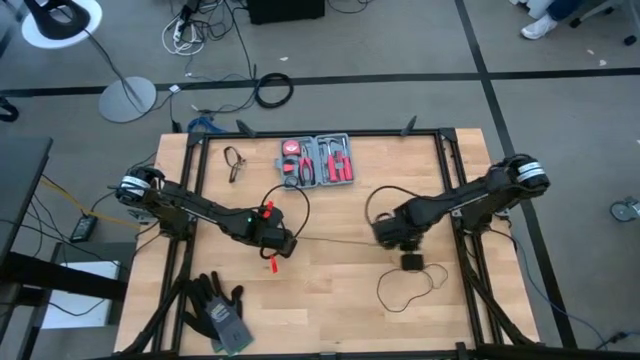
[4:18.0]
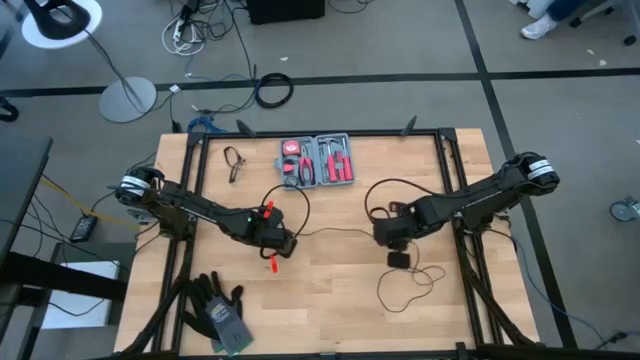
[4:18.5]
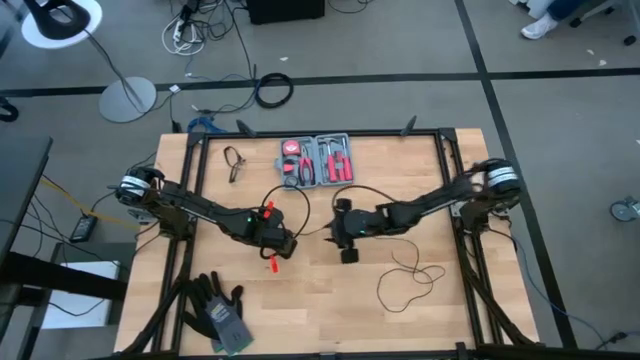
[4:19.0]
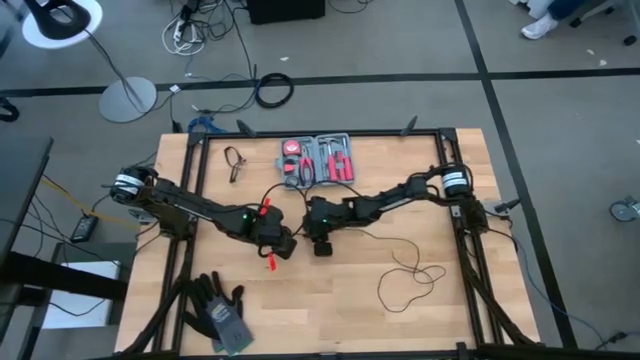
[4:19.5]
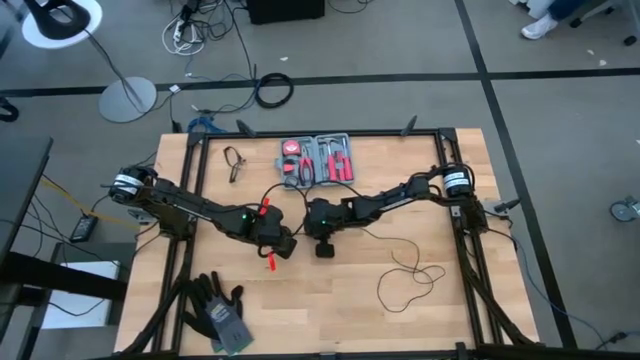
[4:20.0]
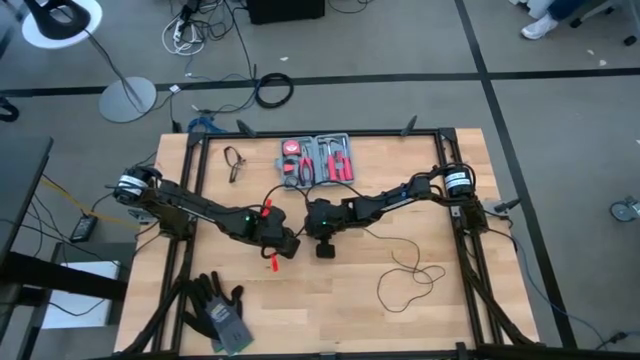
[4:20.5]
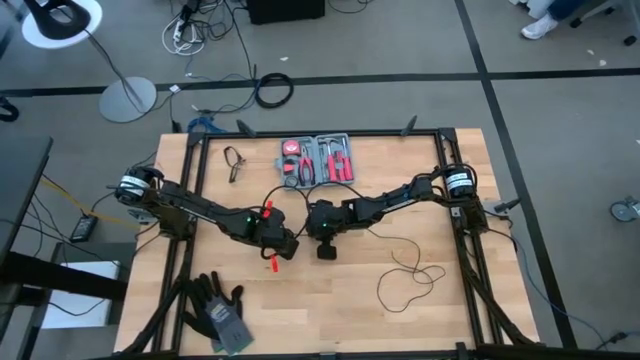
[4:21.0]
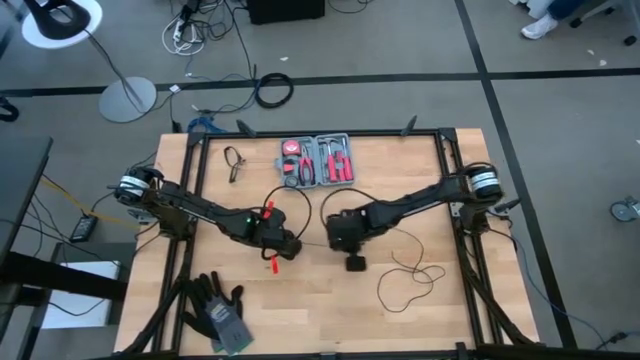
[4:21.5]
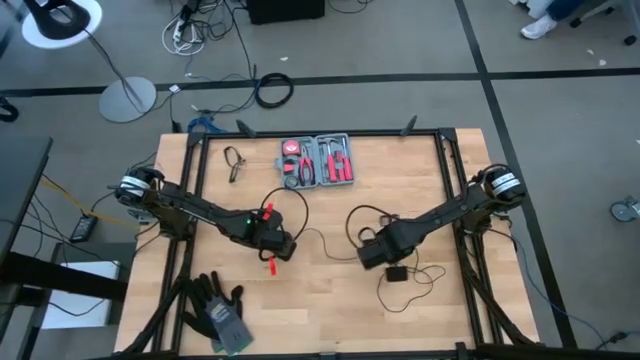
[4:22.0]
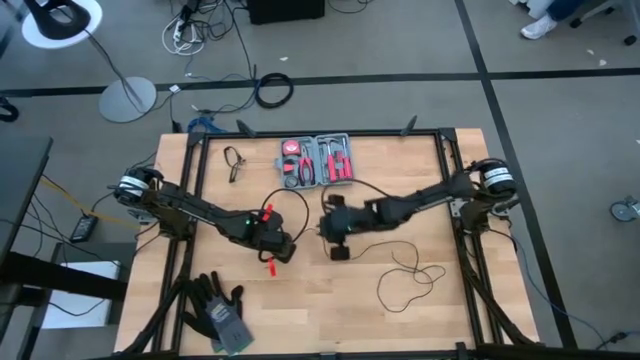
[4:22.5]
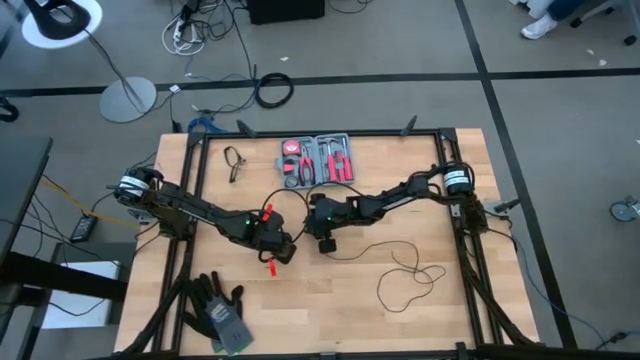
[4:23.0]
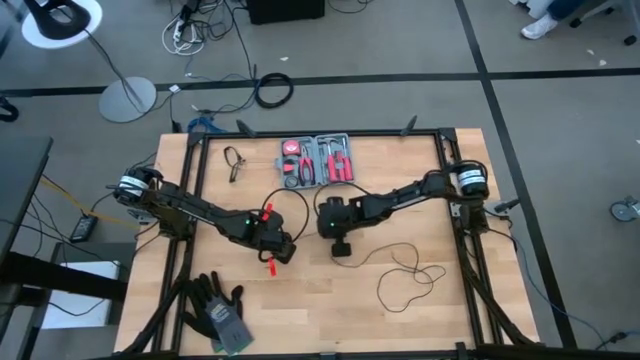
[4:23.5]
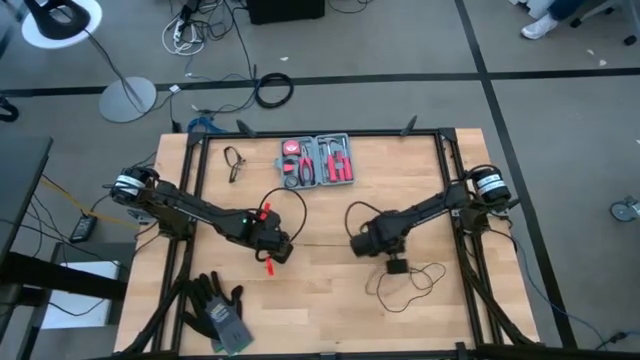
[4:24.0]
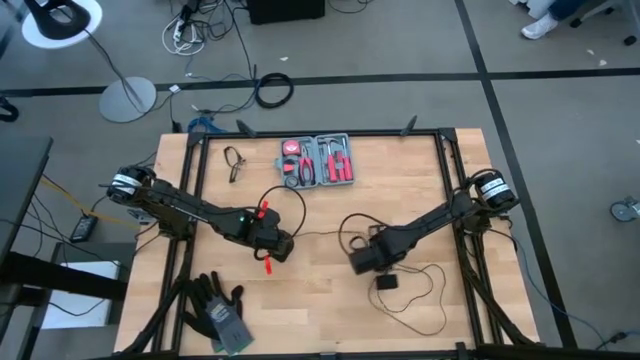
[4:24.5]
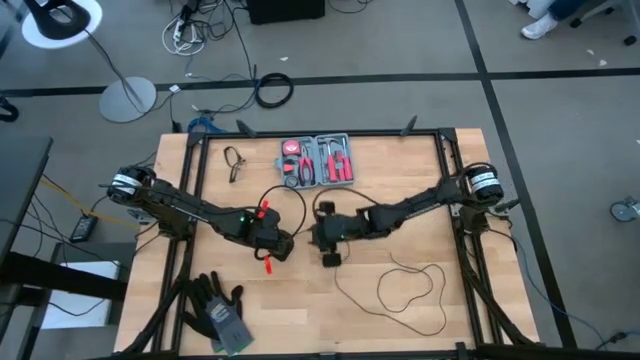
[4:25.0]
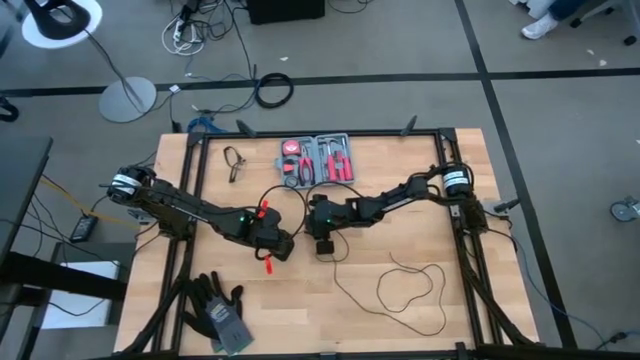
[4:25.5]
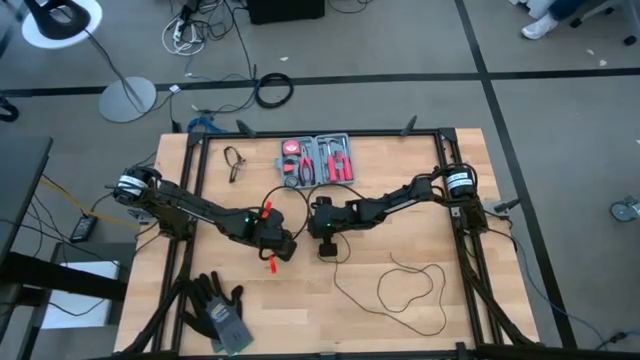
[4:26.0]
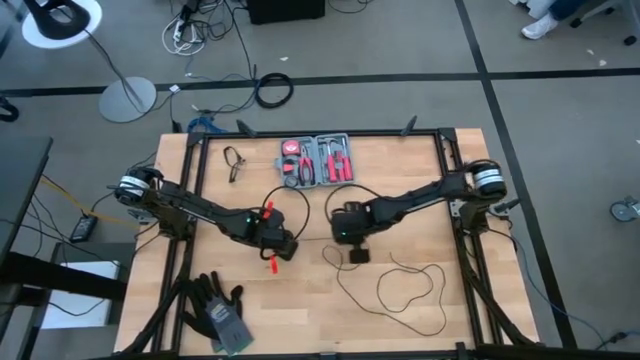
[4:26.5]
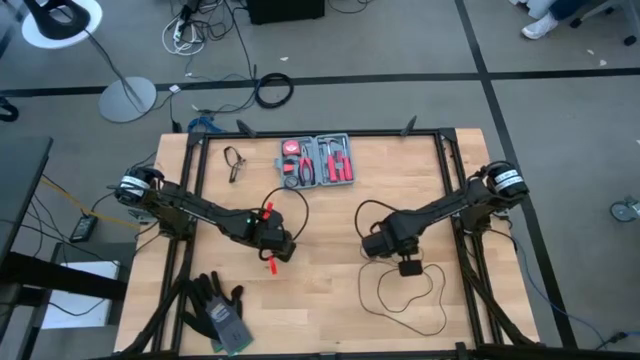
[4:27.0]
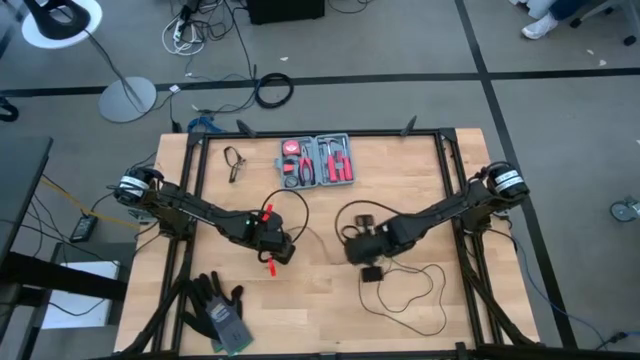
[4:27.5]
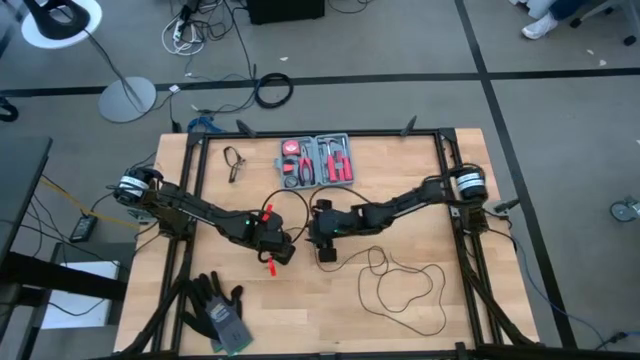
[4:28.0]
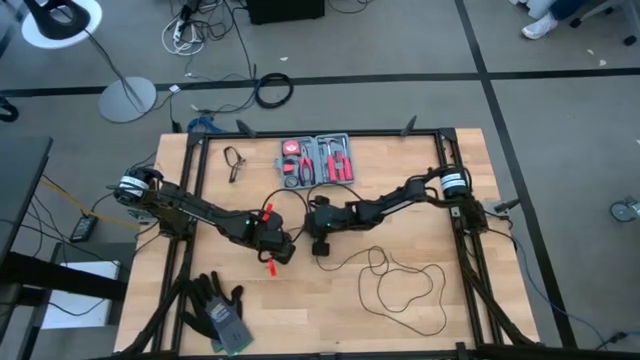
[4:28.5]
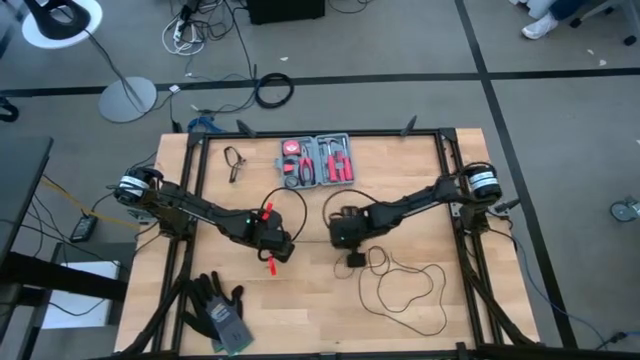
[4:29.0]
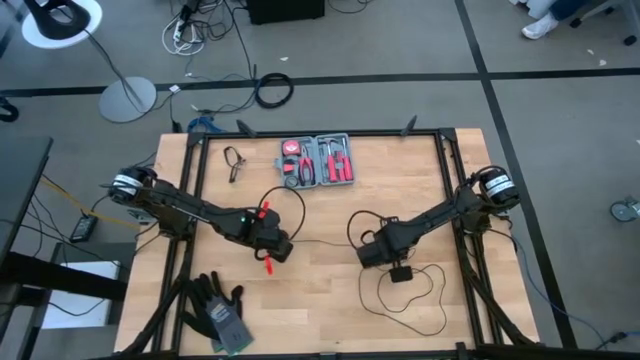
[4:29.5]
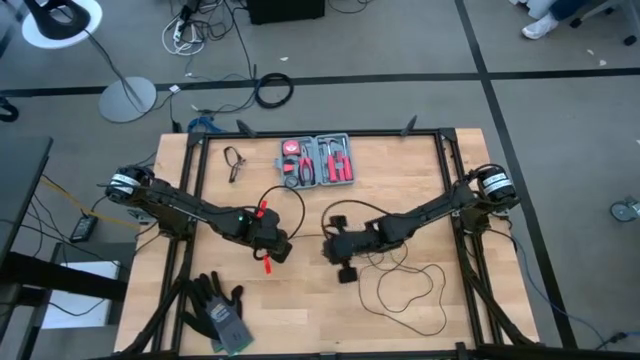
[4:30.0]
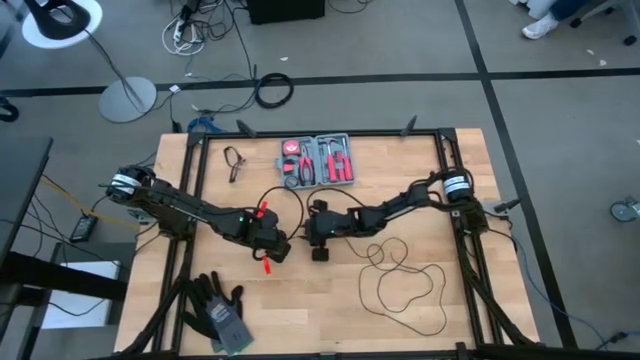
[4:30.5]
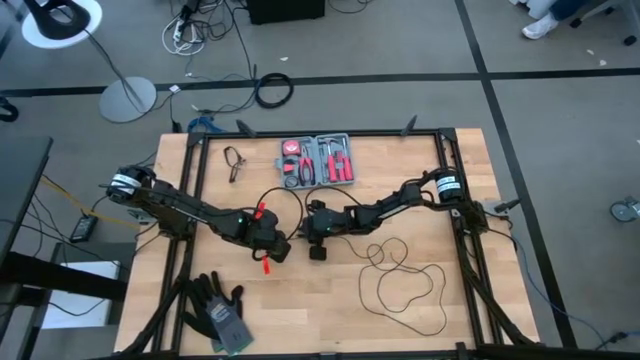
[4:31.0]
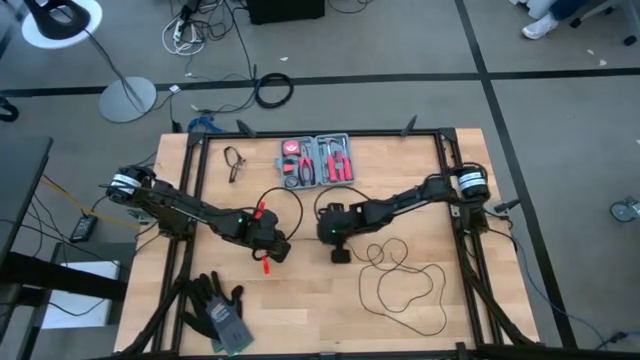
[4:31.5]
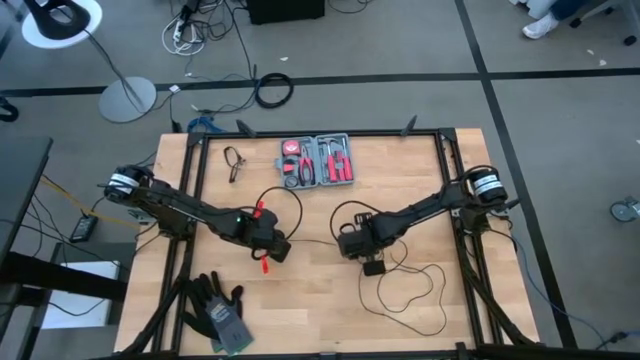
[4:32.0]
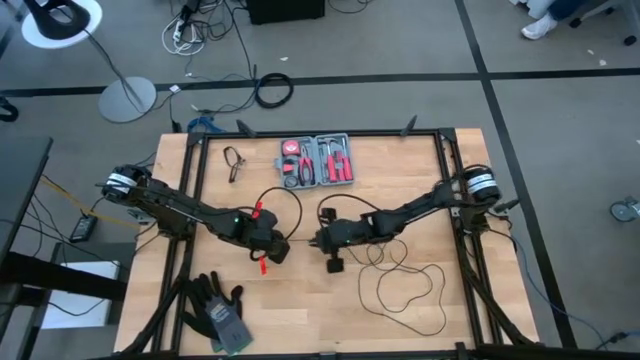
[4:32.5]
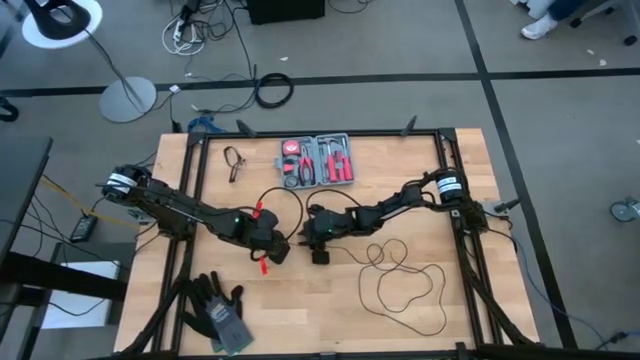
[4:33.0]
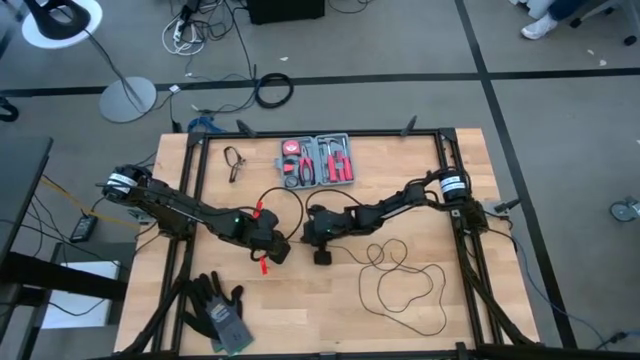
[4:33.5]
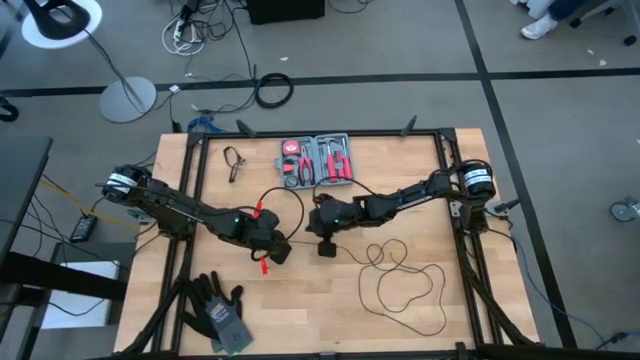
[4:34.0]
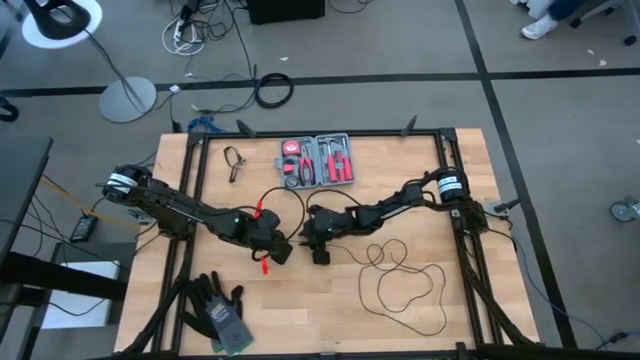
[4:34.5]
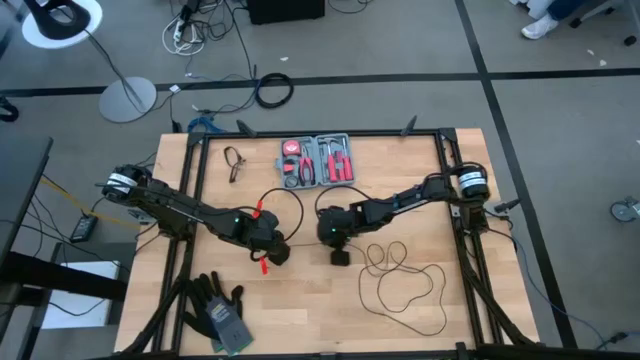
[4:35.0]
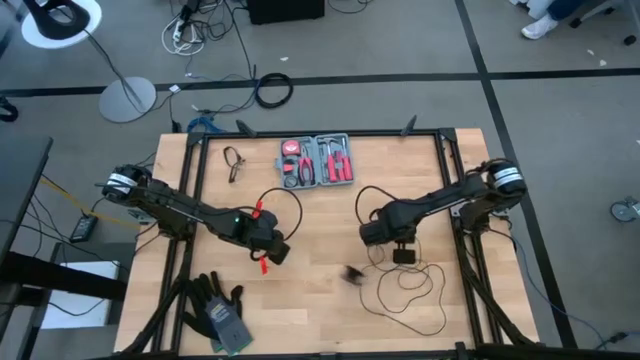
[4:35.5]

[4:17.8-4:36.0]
Task: Coil cords
Uncoil the black wire from the black spool

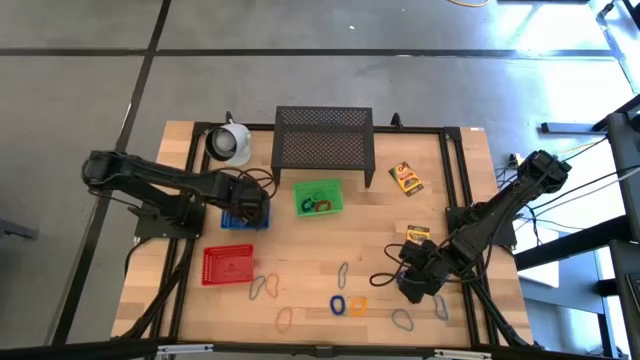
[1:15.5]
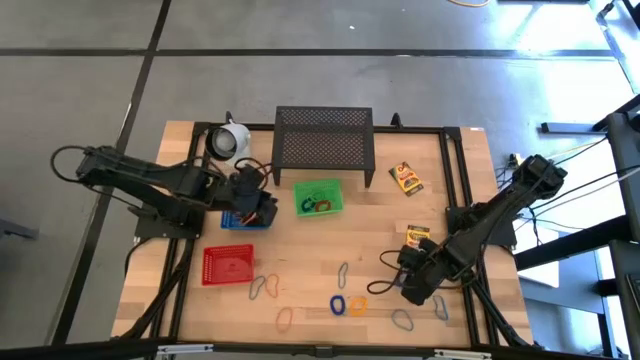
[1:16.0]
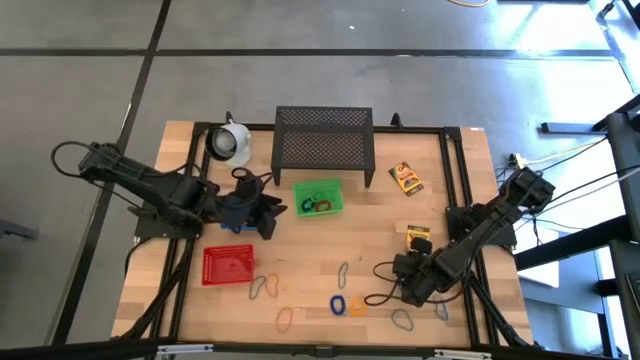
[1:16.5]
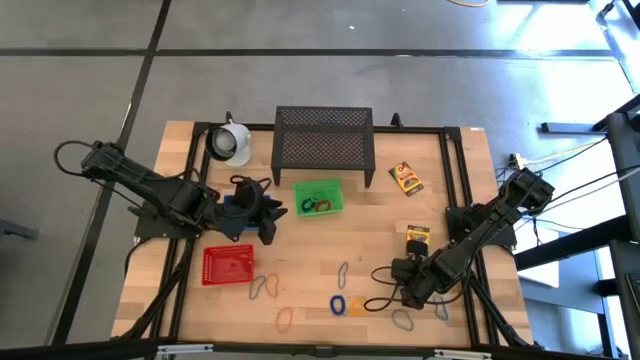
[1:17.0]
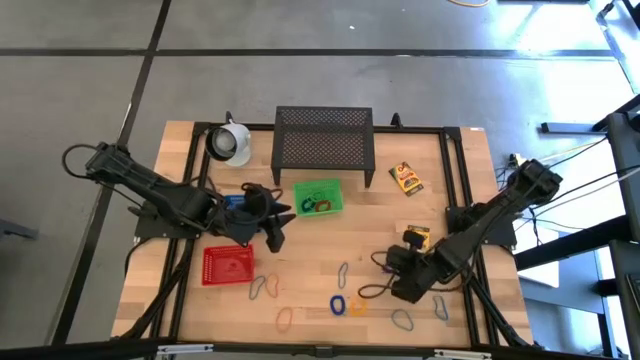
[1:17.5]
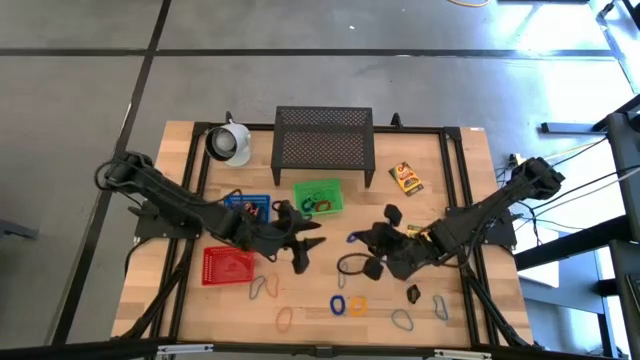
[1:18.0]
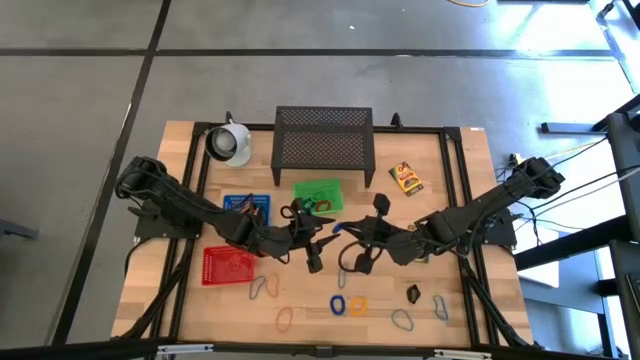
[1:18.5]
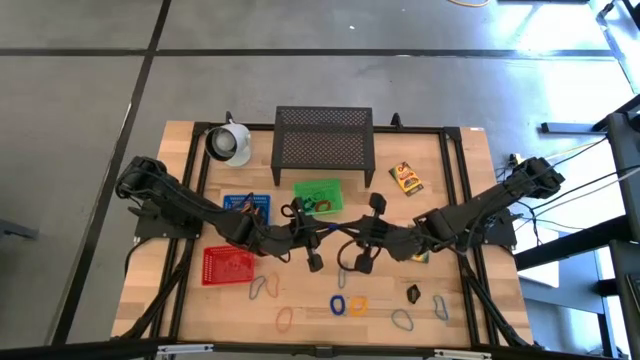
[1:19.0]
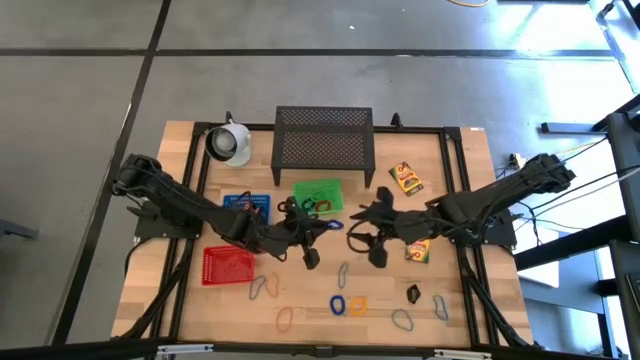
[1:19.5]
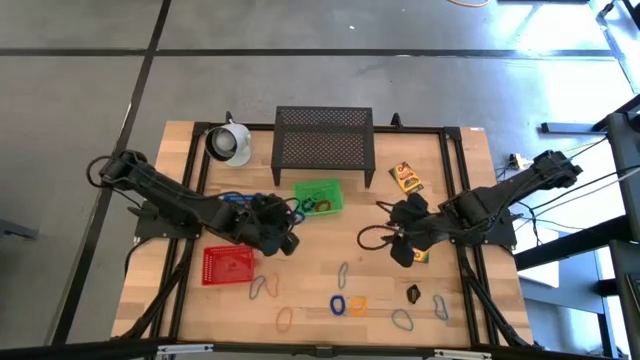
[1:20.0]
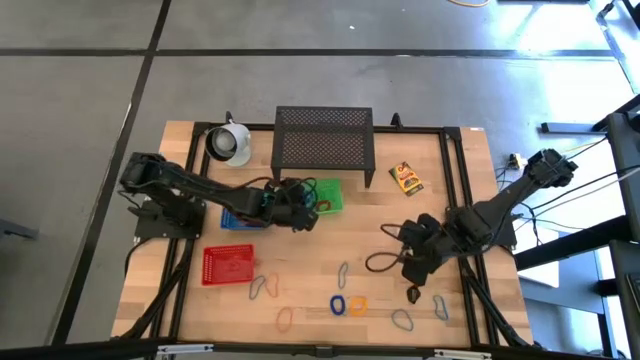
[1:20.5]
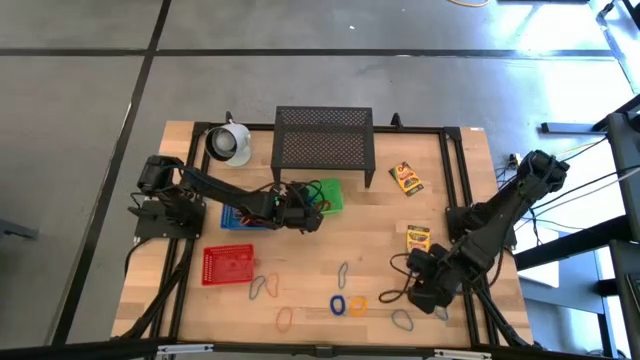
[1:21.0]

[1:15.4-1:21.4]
Task: Pick & Place Office Desk Supplies
Put the bottom right blue spring keychain into the green bin
